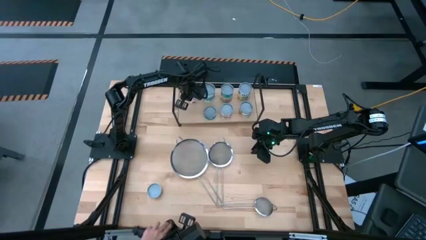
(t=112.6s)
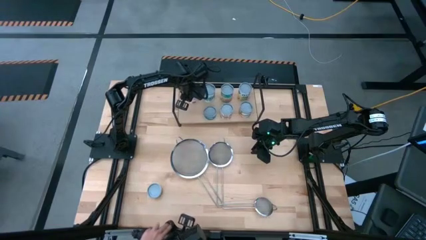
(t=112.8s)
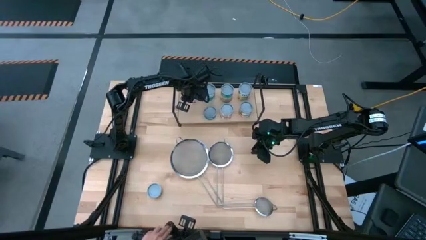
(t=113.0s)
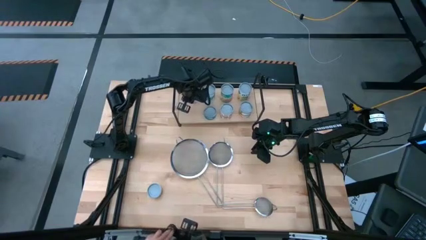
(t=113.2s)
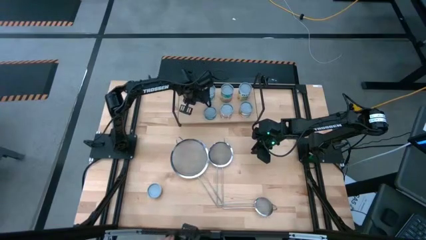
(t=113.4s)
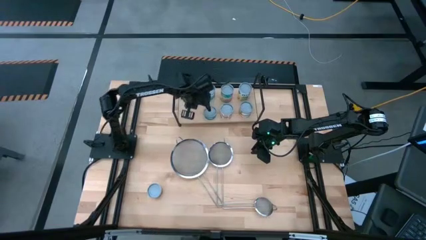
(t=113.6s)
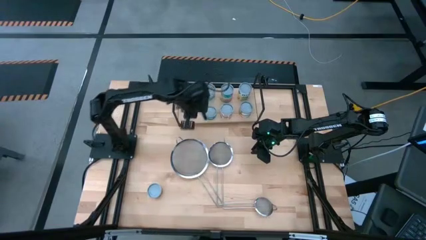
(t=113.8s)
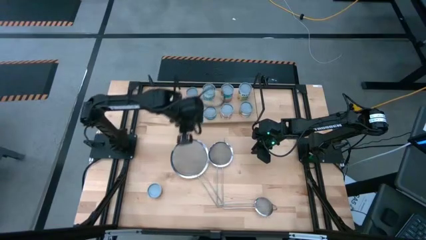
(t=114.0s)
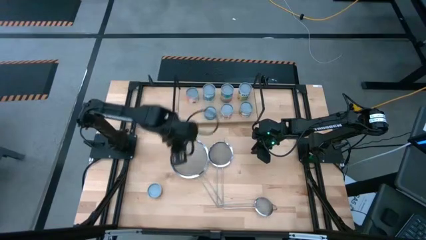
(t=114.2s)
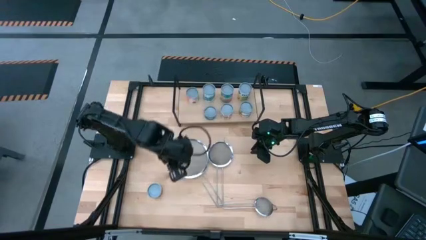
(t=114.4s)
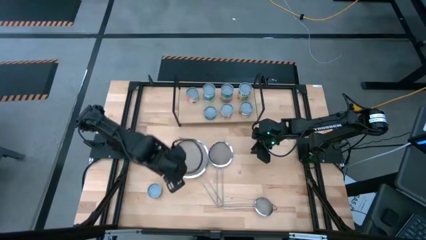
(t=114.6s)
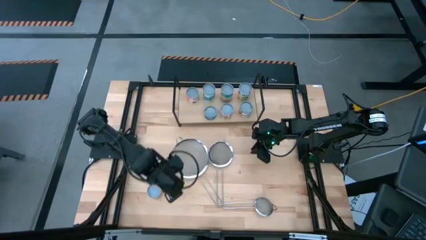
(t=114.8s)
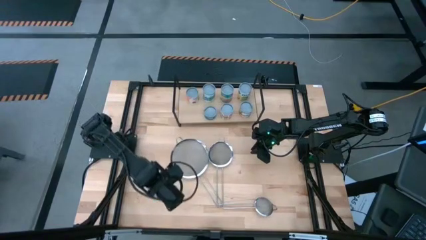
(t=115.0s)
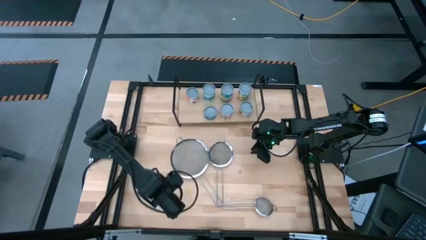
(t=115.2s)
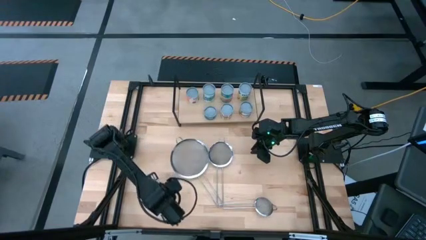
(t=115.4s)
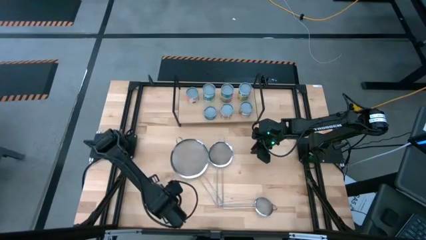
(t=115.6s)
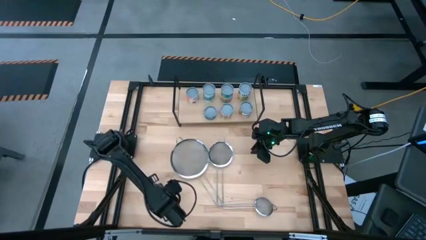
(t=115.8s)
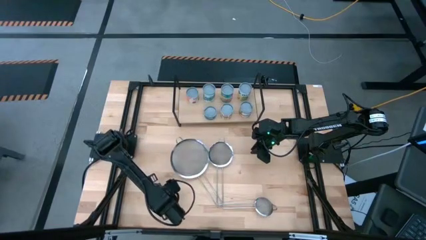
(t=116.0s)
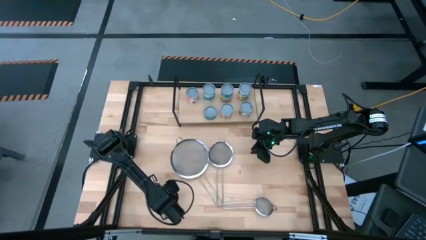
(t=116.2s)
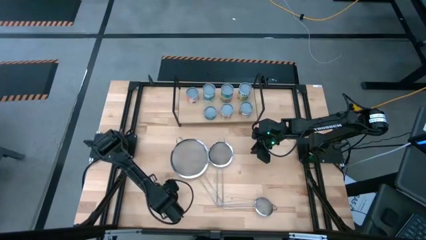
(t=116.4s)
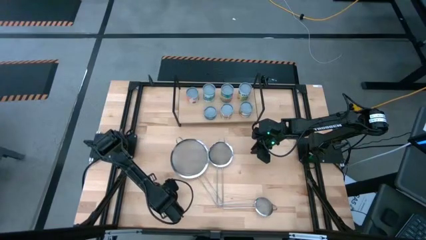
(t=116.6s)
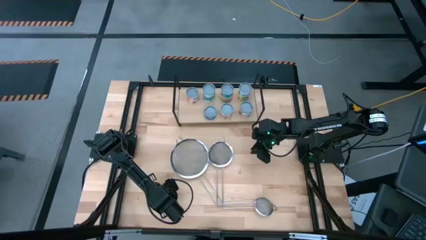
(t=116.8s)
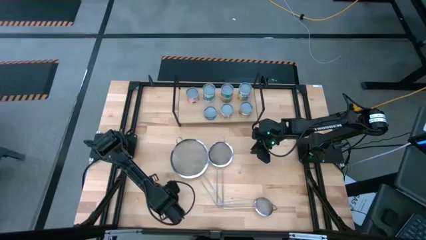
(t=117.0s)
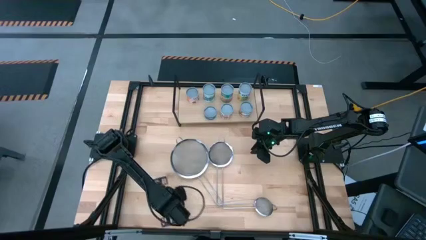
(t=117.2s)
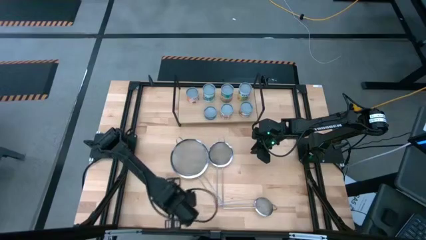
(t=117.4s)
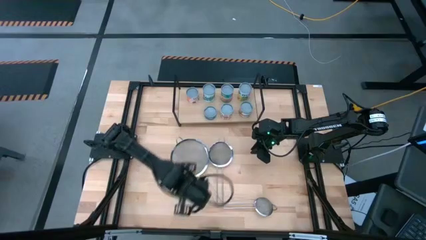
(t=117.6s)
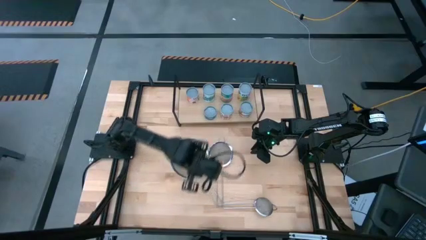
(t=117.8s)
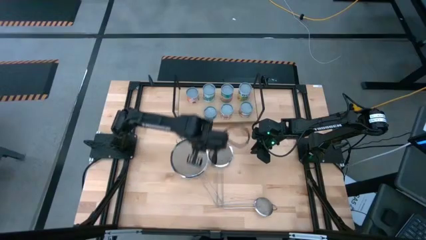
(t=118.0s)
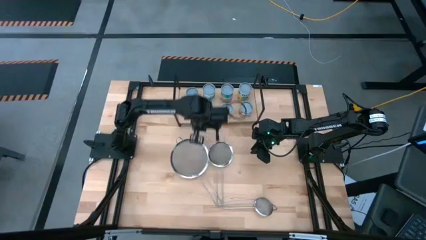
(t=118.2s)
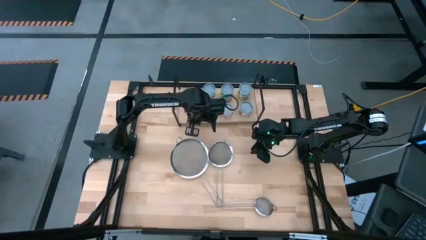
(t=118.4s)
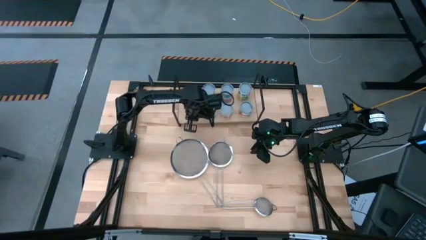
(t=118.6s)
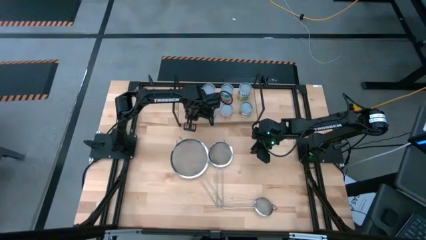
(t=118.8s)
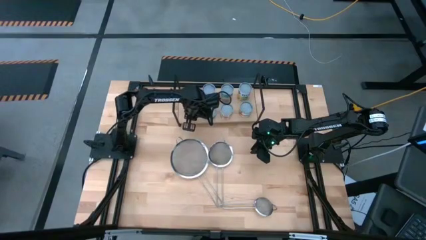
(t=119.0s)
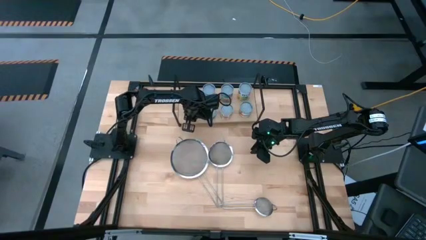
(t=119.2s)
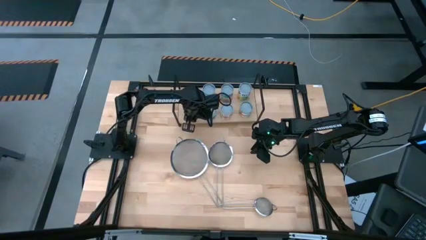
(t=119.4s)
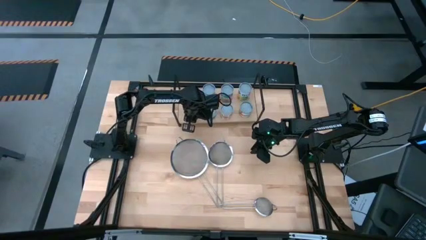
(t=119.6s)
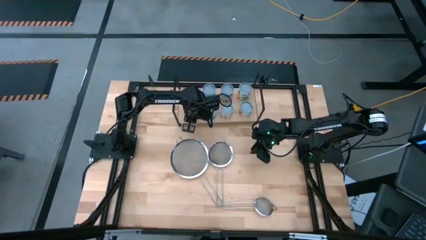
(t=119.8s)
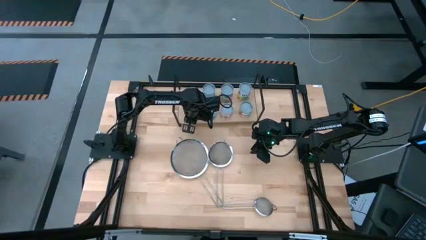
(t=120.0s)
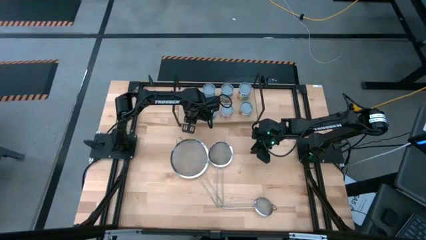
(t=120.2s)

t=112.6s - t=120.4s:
Task: Pick and place cans onto a shelf
Put the canned pineapple rings on the shelf

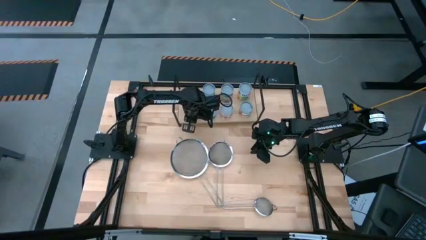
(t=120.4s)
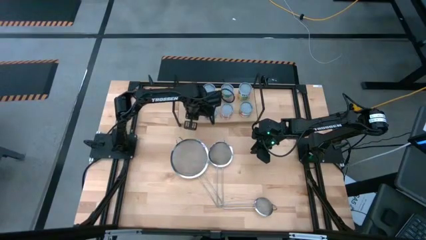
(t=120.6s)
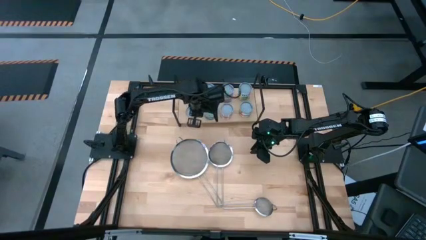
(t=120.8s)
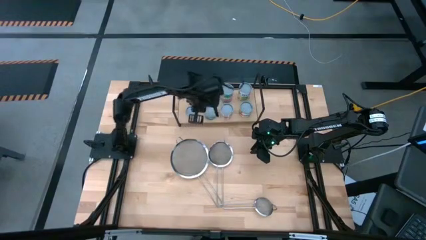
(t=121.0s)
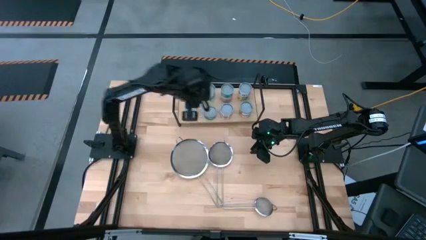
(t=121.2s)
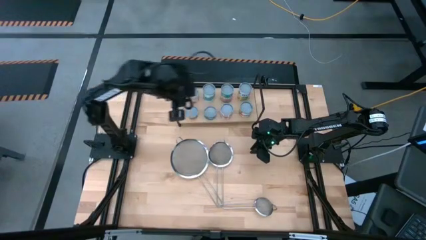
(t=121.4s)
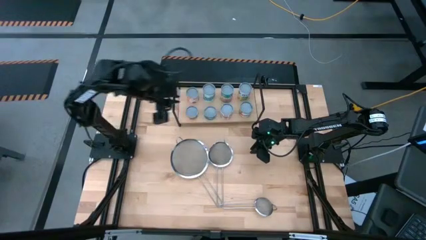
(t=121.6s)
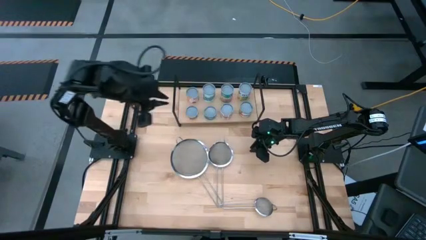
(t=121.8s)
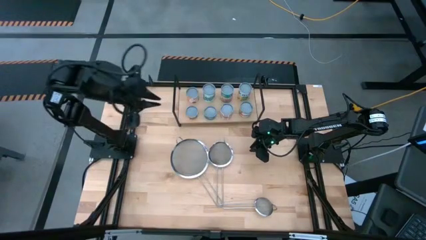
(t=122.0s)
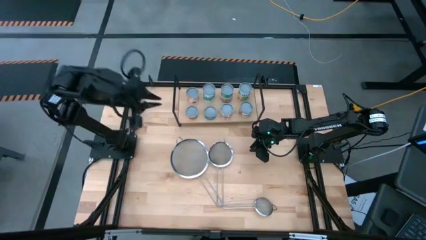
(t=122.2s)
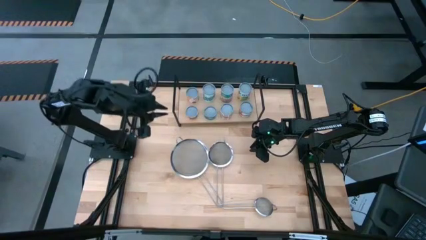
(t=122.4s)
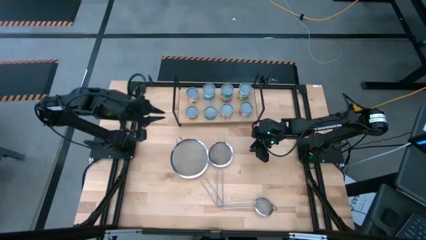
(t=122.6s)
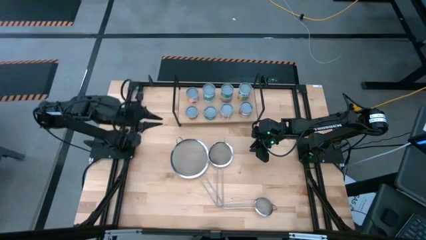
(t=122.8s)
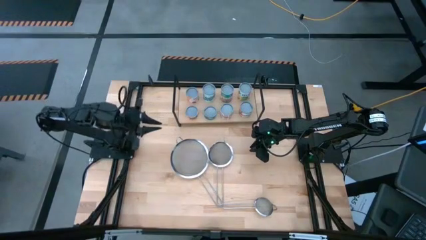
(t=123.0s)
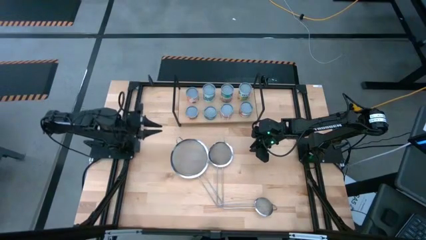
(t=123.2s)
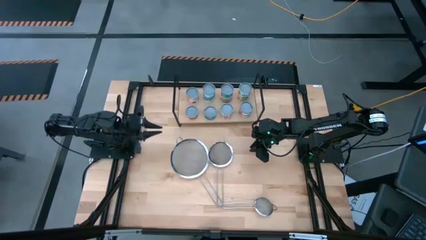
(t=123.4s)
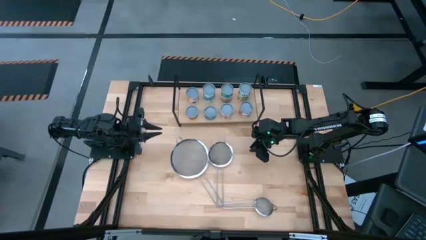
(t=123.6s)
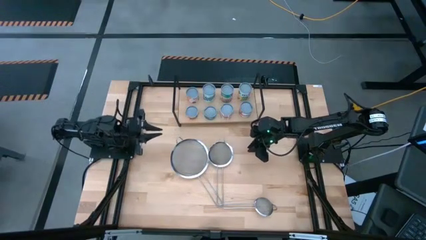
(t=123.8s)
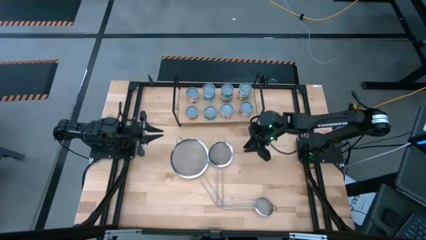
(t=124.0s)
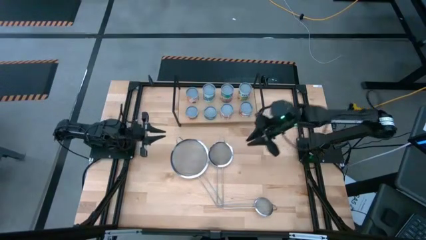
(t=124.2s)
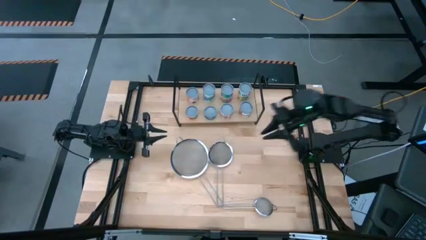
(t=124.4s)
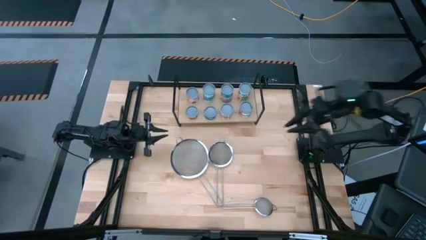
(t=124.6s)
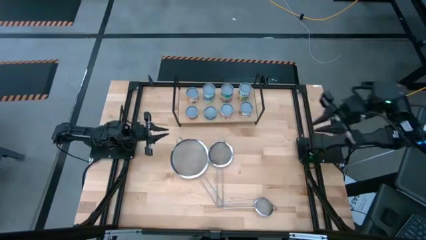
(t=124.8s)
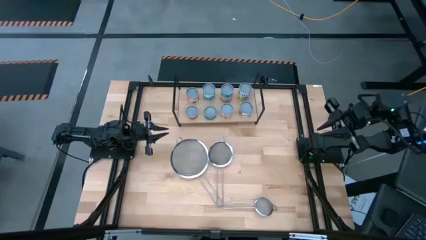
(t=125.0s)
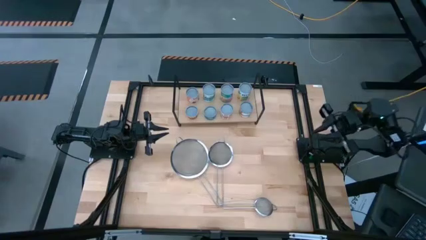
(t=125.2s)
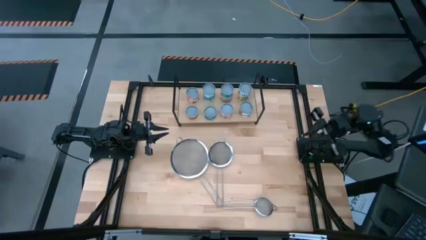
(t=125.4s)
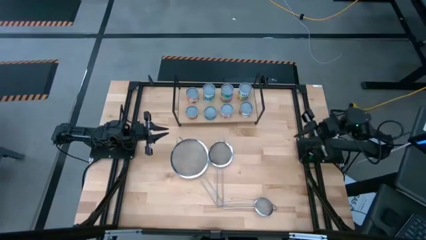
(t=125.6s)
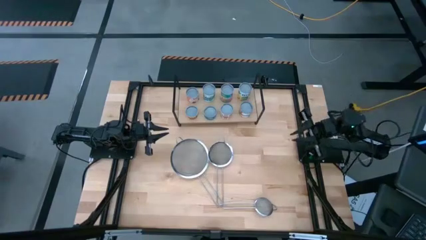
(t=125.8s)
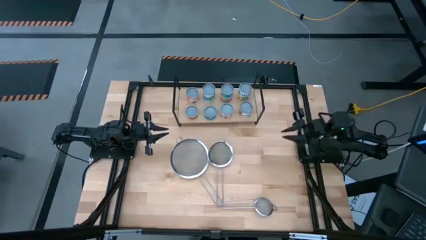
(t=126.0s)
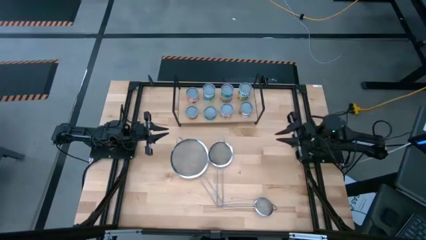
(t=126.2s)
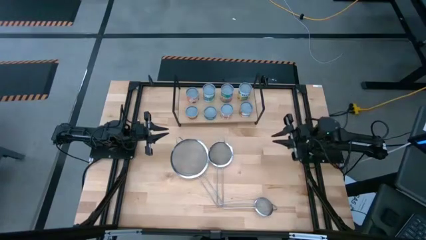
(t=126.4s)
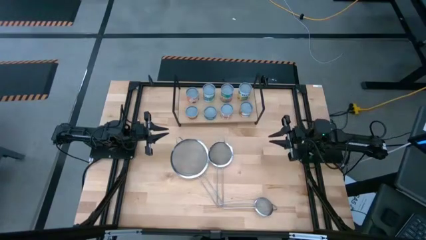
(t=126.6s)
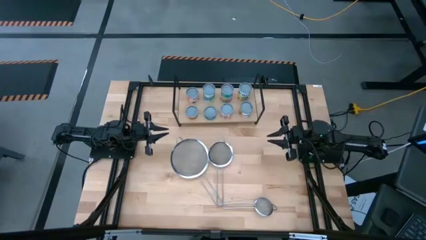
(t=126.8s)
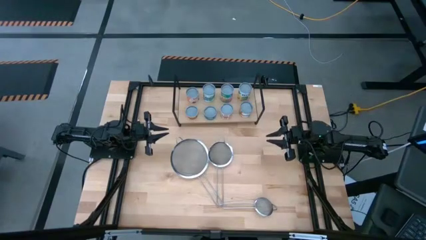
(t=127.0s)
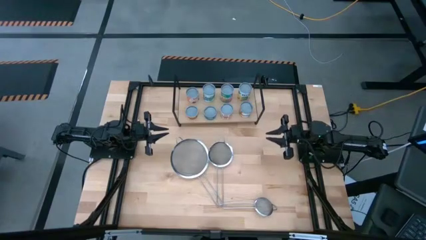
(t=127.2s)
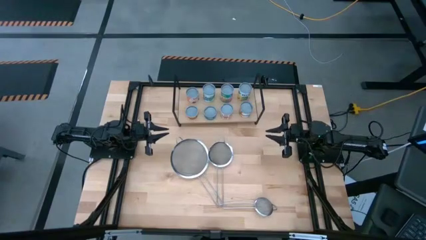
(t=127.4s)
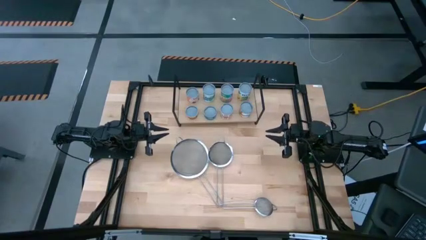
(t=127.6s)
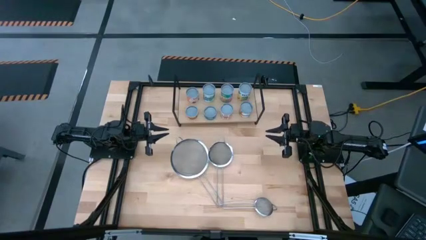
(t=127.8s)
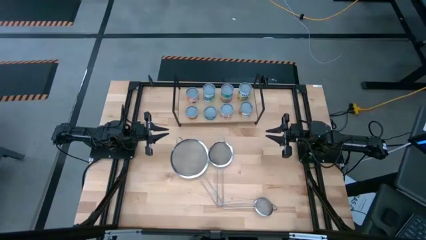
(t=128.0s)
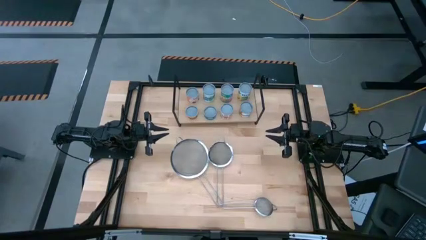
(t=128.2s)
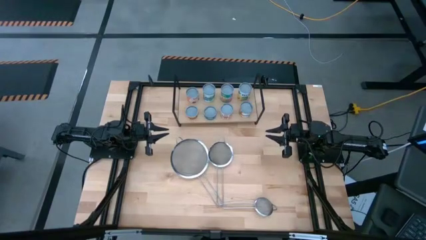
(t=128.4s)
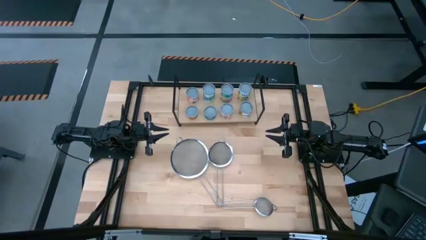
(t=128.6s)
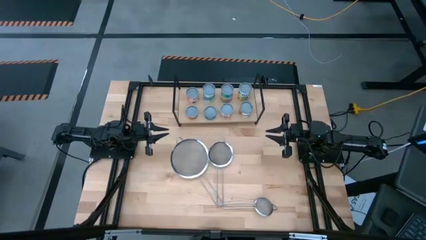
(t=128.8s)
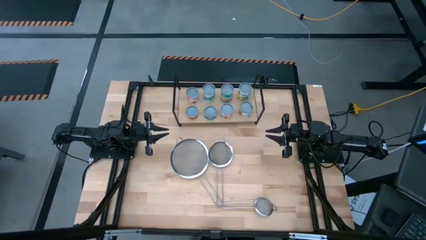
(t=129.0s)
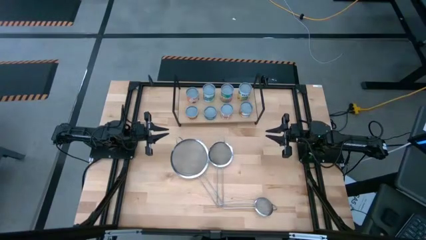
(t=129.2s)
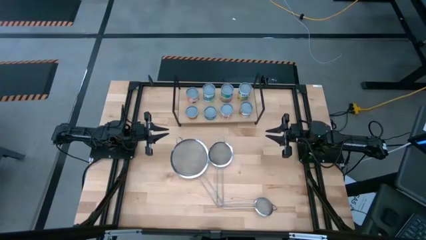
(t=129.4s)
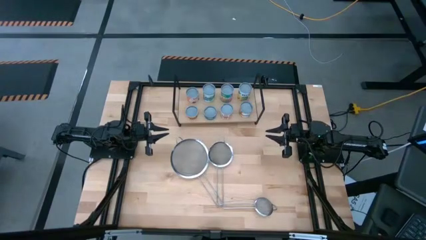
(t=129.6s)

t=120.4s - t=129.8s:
Return to Home Position
